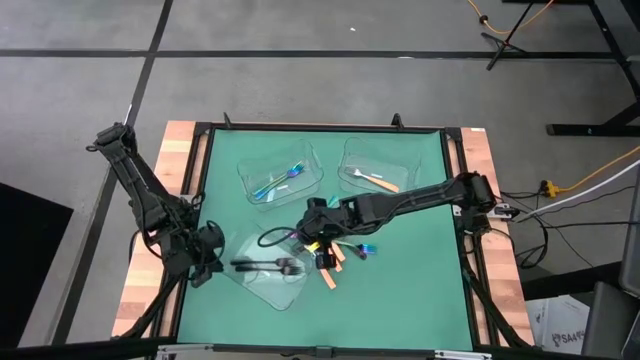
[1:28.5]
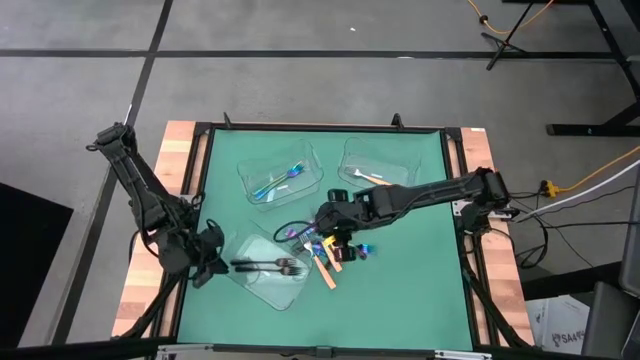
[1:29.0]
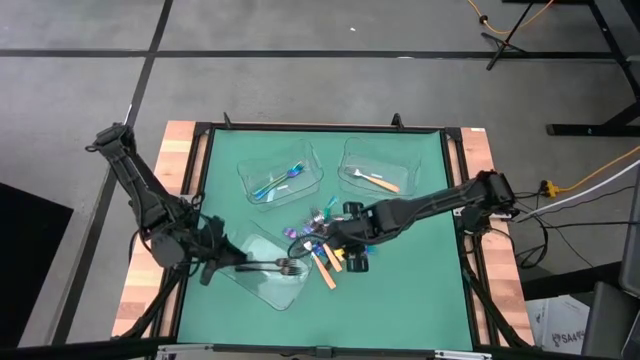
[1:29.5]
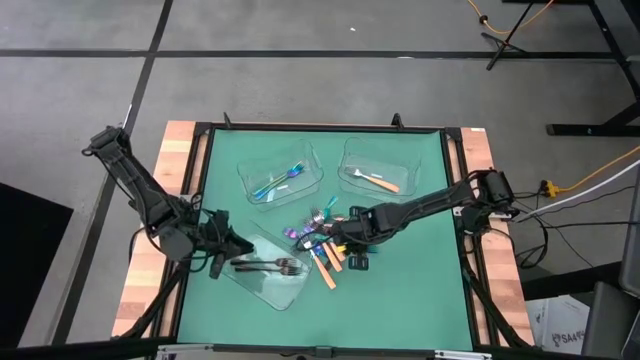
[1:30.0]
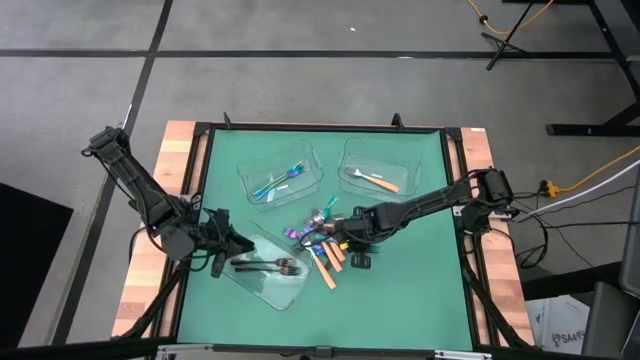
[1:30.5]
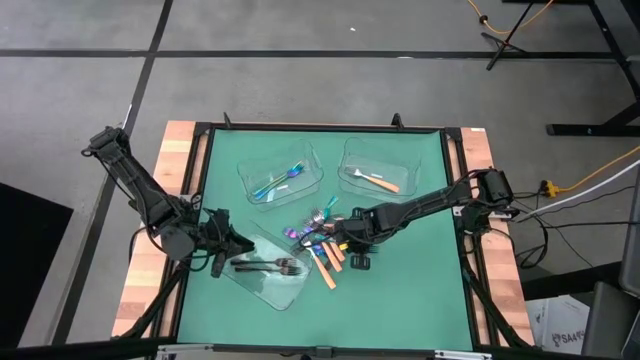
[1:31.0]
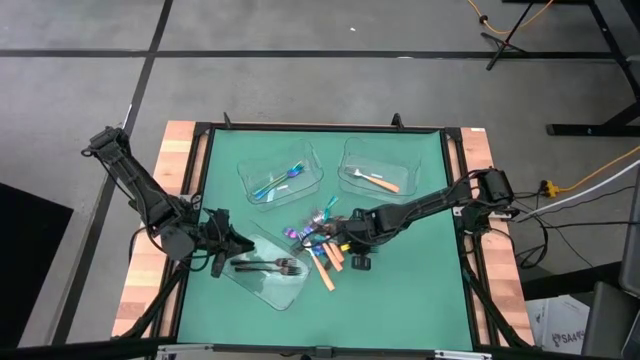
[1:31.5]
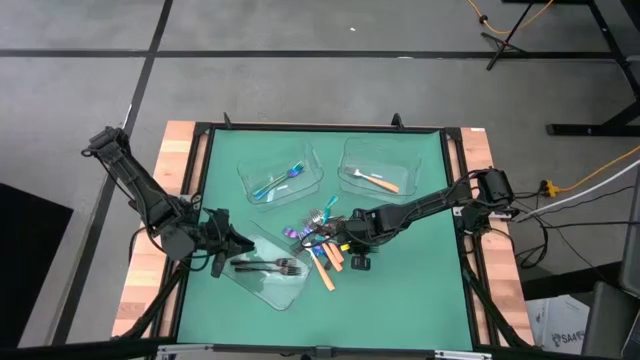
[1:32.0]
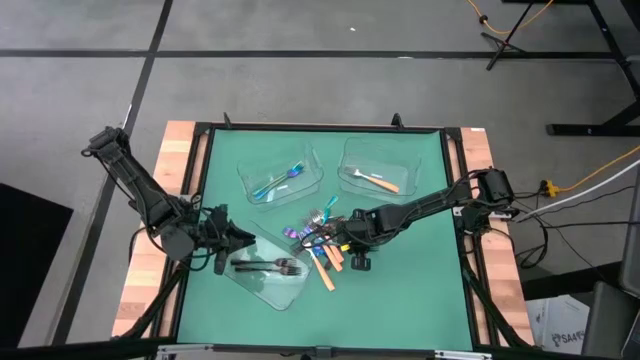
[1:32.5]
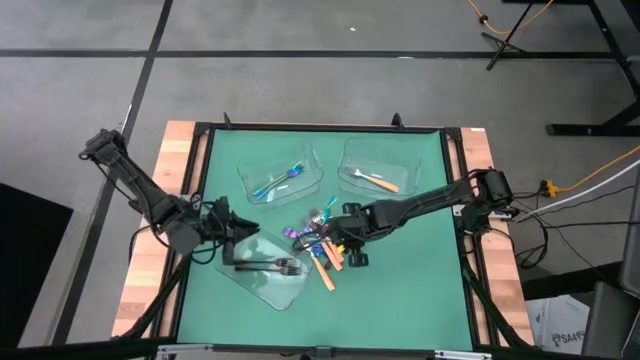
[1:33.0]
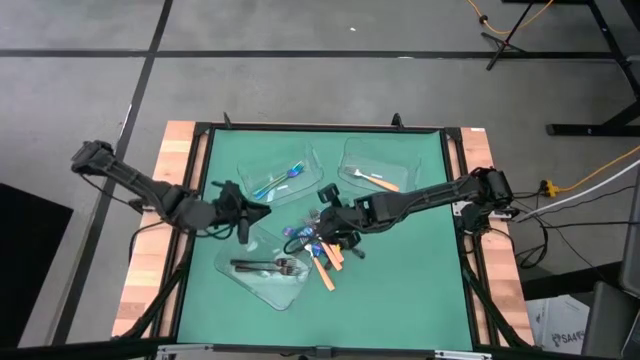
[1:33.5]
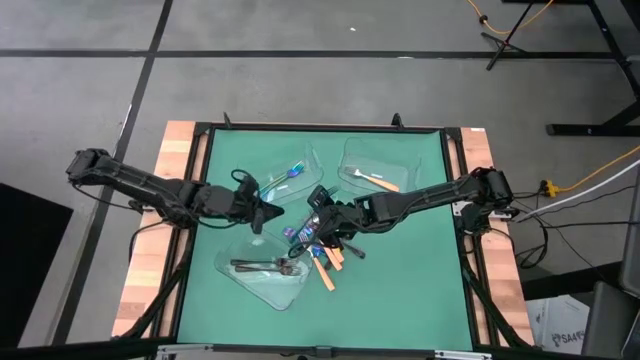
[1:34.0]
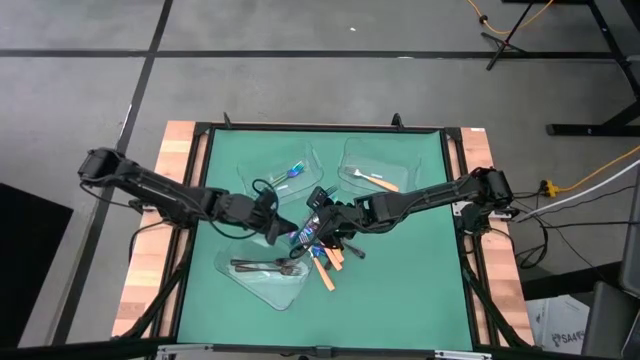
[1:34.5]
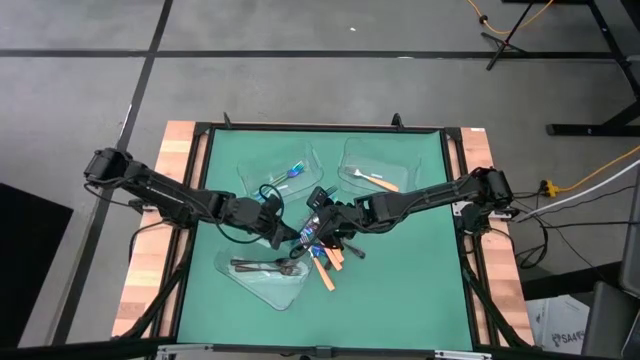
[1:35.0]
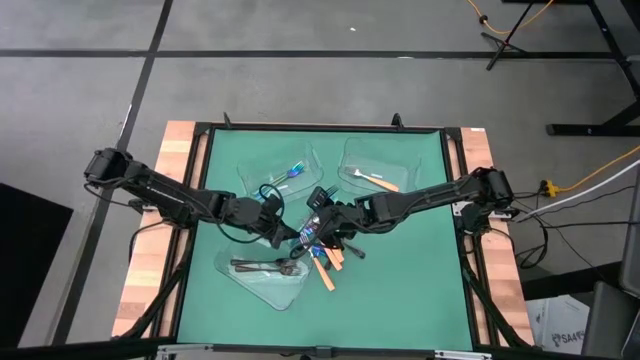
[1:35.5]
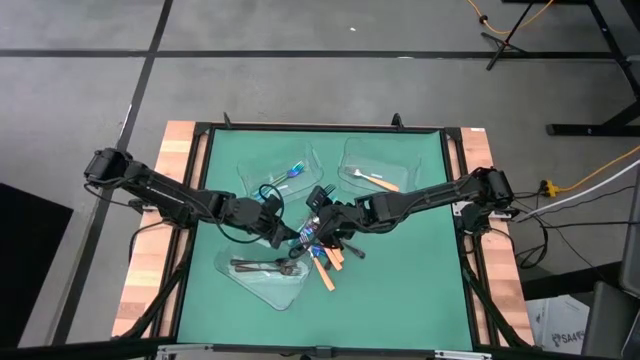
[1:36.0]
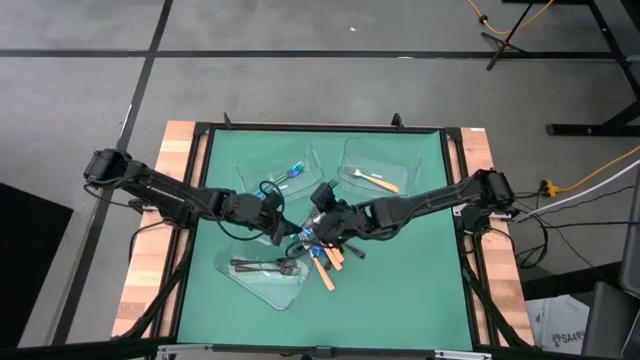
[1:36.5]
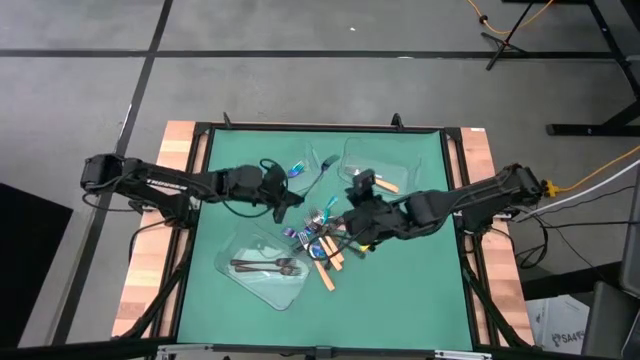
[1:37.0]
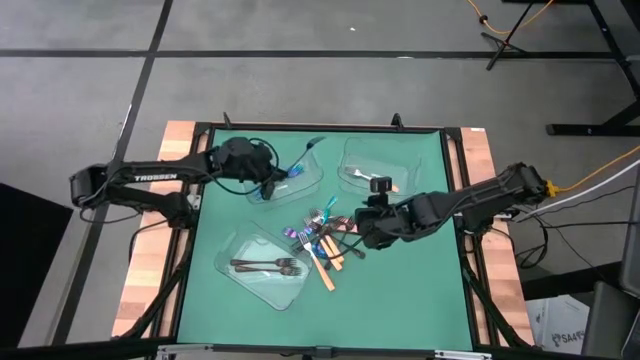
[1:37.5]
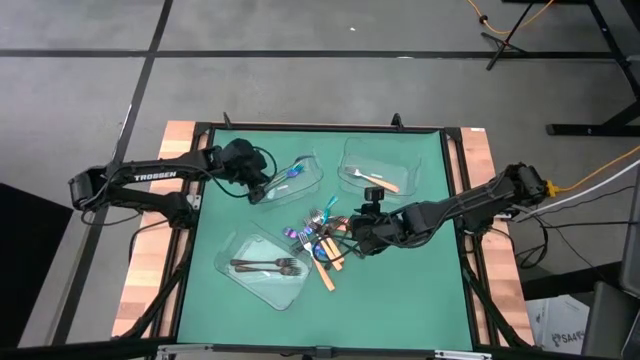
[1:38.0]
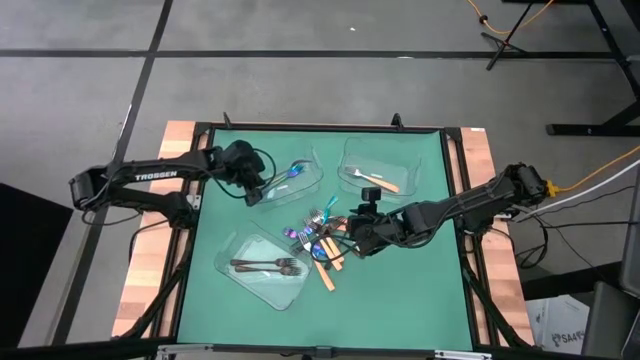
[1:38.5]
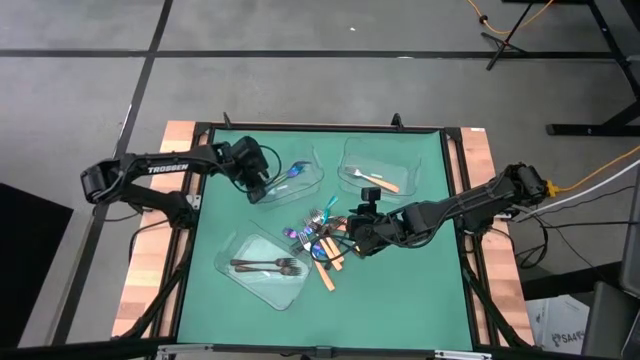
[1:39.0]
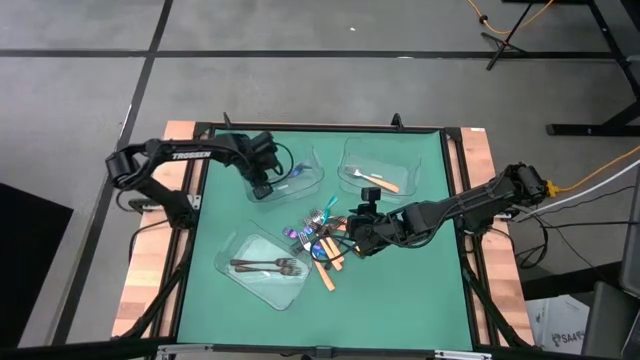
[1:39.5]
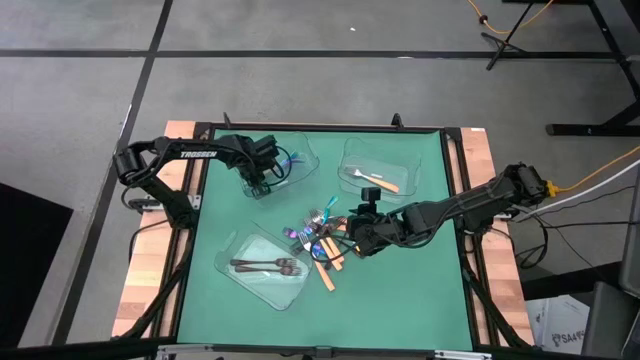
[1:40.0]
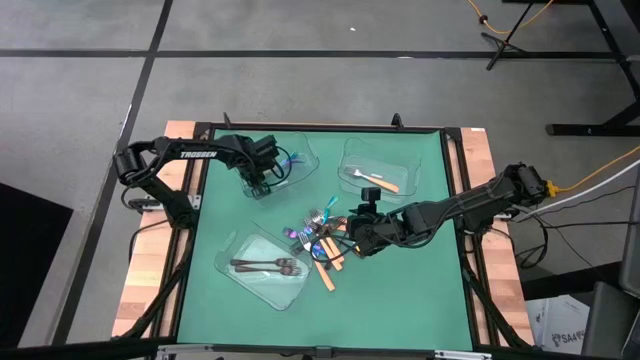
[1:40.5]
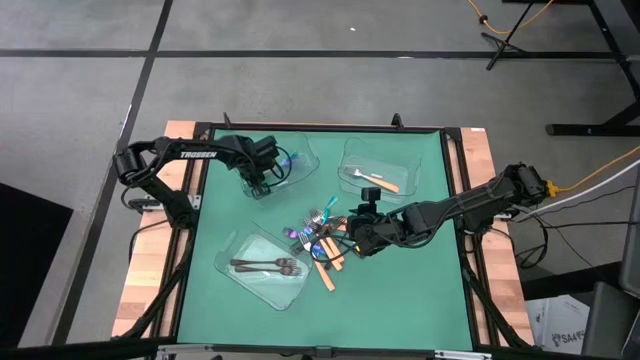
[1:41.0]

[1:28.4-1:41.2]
Task: Sort silverware by color (type)
Put the blue fork into the top left transparent bin
